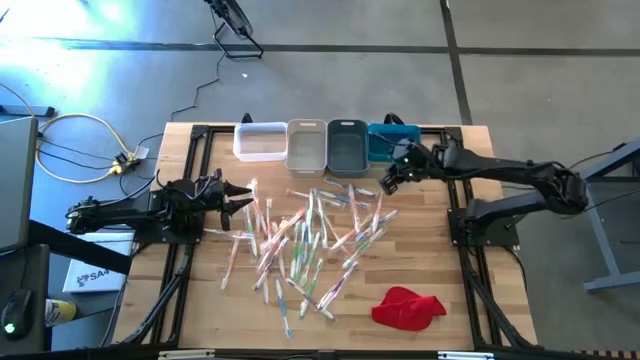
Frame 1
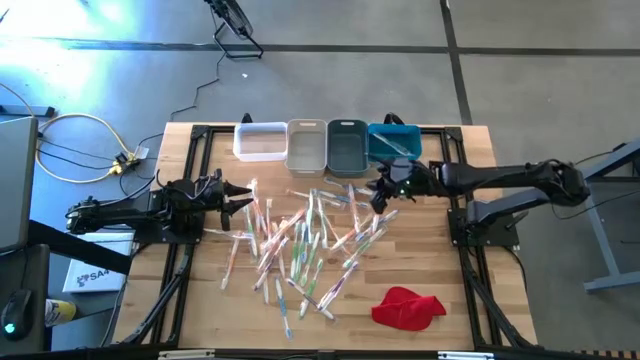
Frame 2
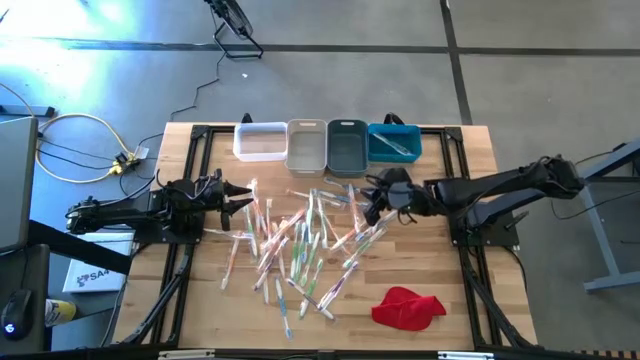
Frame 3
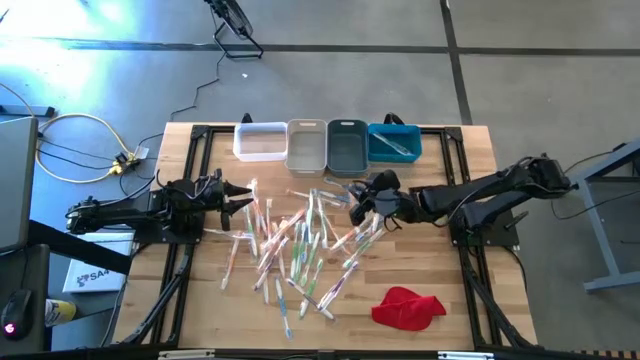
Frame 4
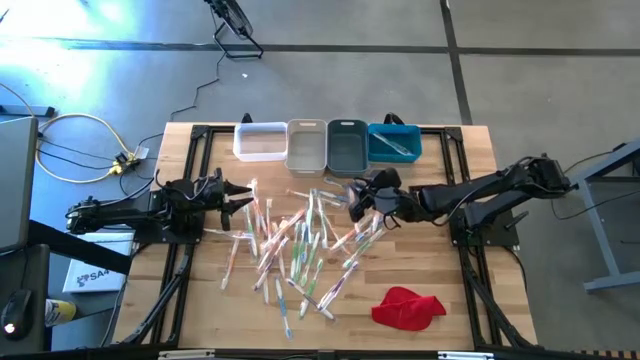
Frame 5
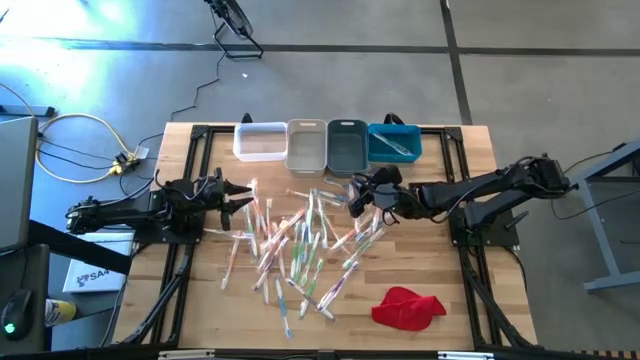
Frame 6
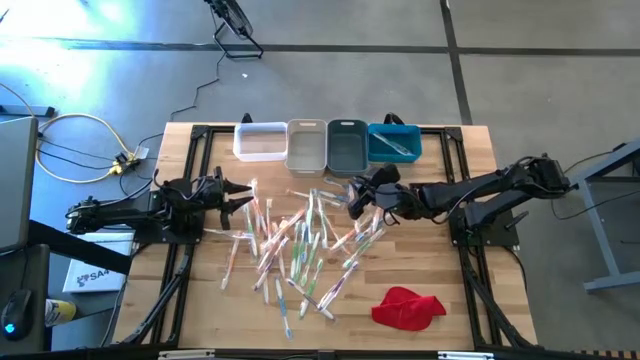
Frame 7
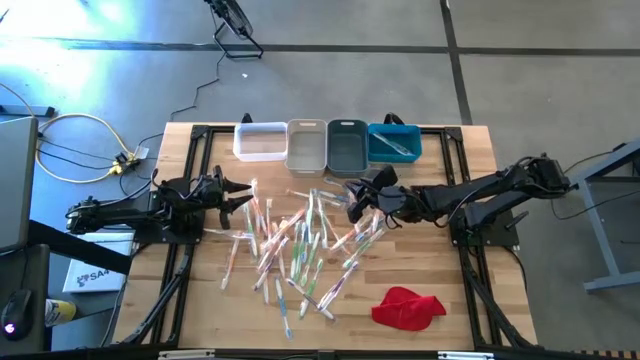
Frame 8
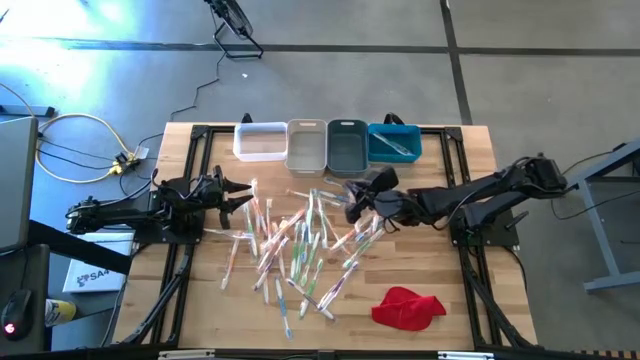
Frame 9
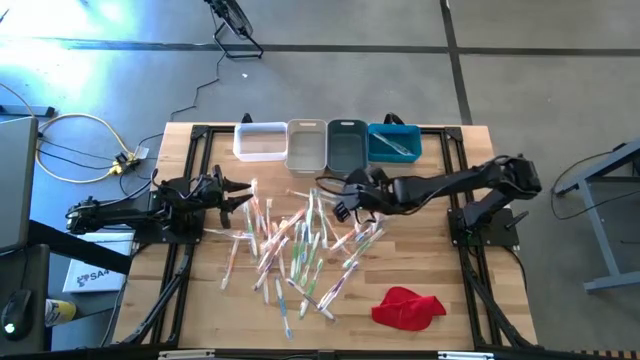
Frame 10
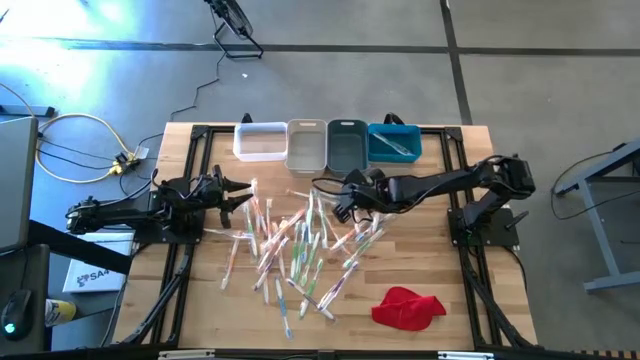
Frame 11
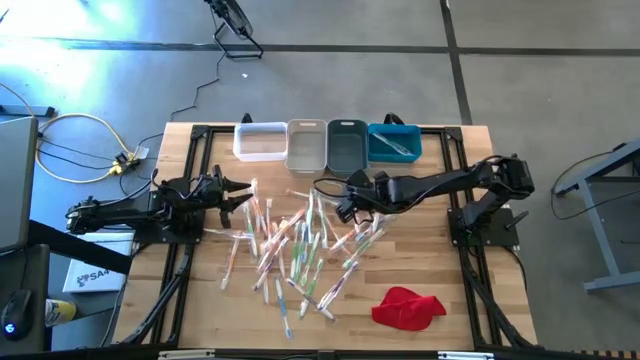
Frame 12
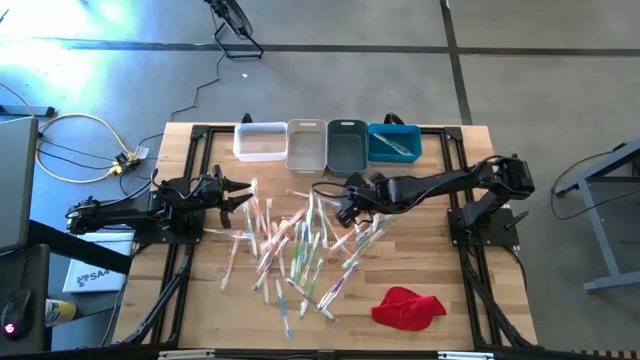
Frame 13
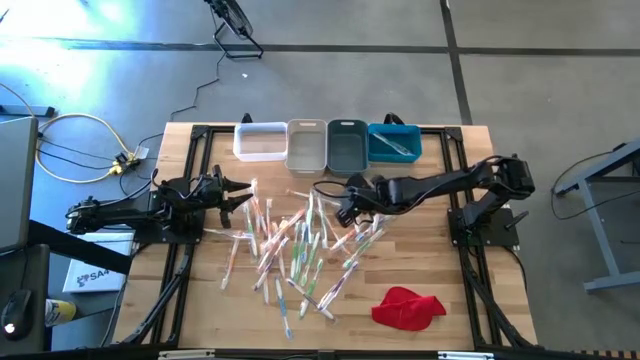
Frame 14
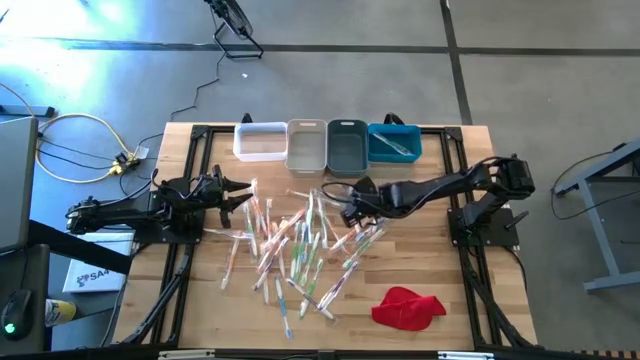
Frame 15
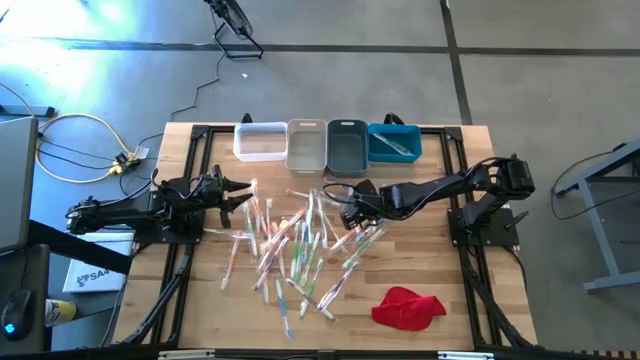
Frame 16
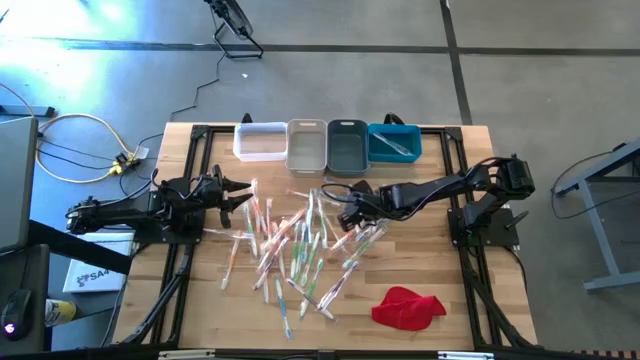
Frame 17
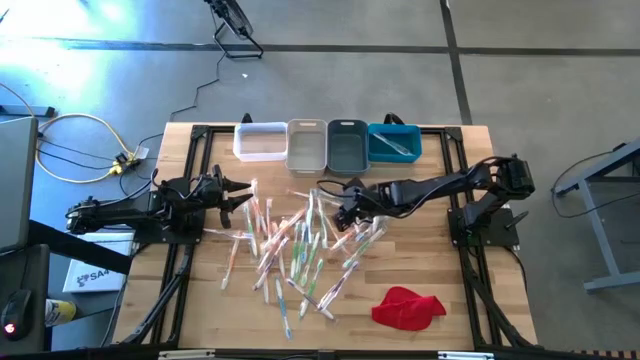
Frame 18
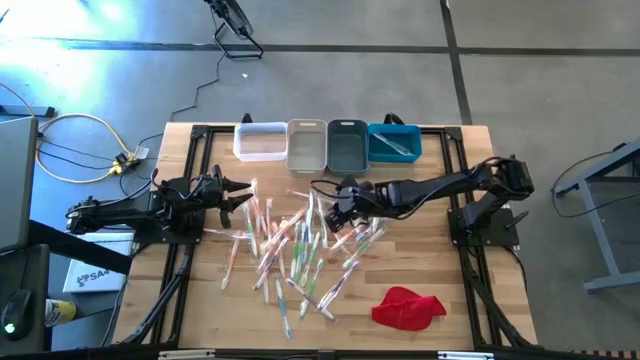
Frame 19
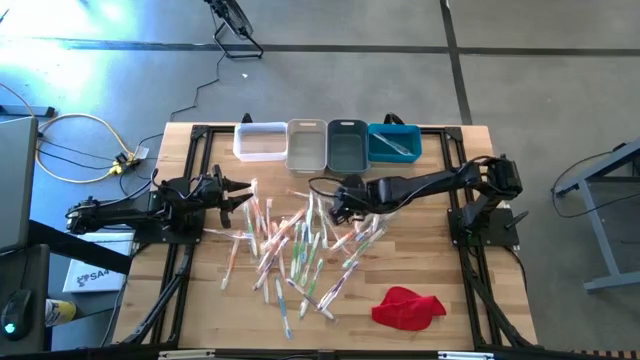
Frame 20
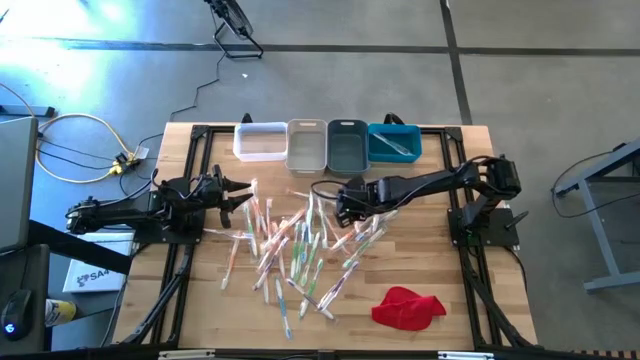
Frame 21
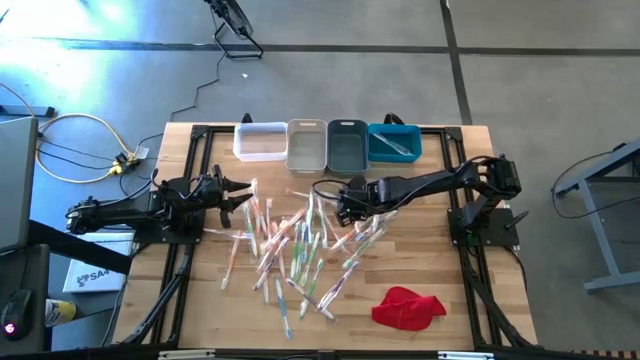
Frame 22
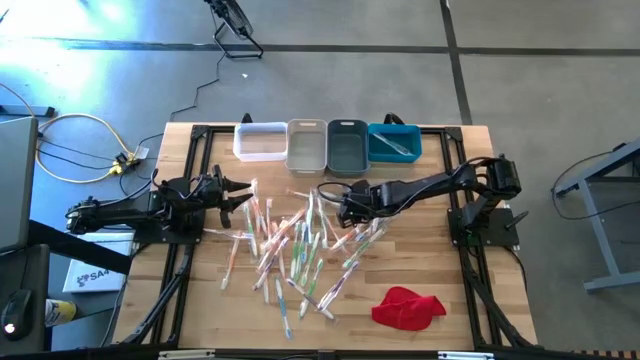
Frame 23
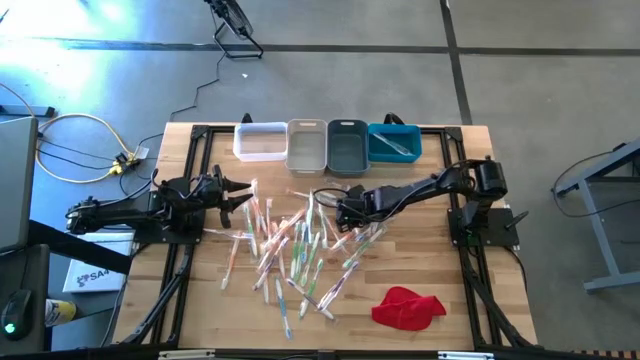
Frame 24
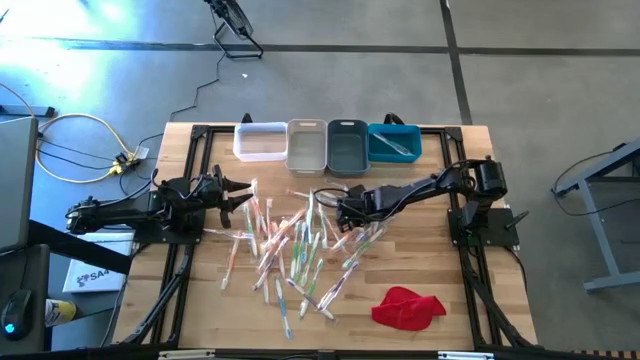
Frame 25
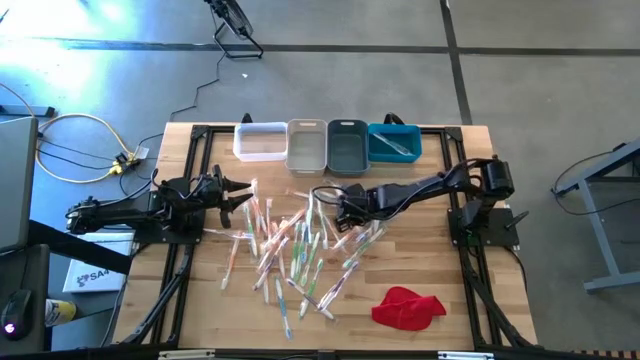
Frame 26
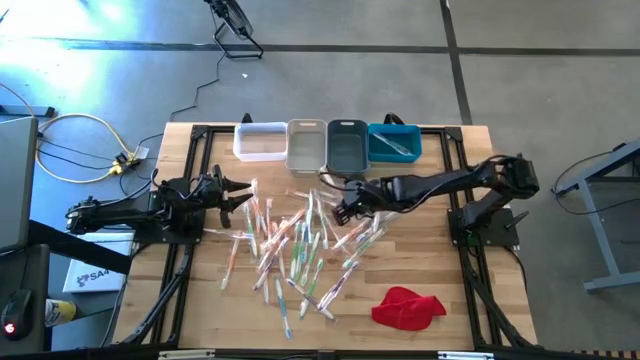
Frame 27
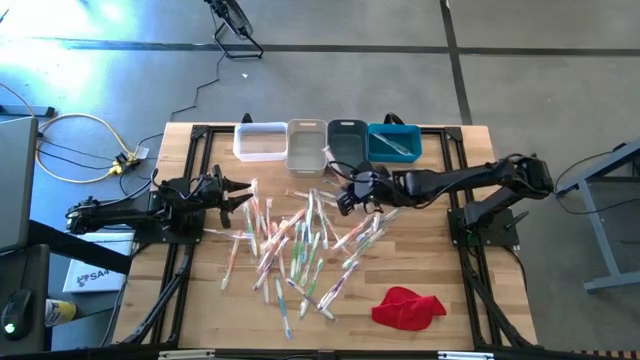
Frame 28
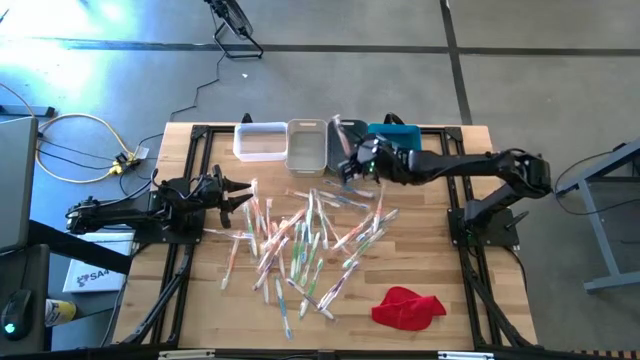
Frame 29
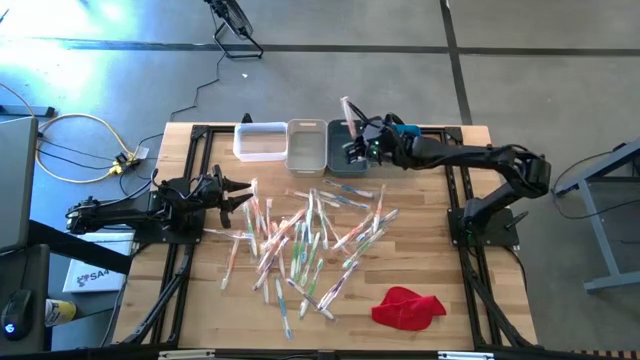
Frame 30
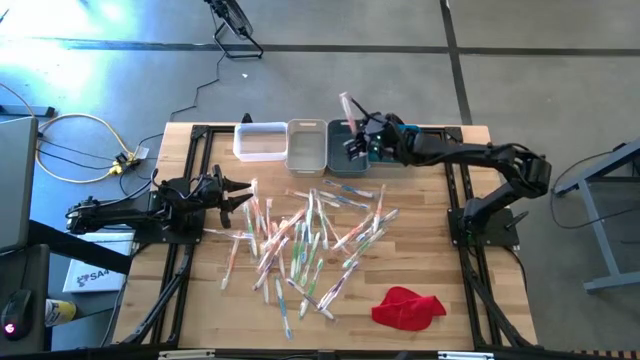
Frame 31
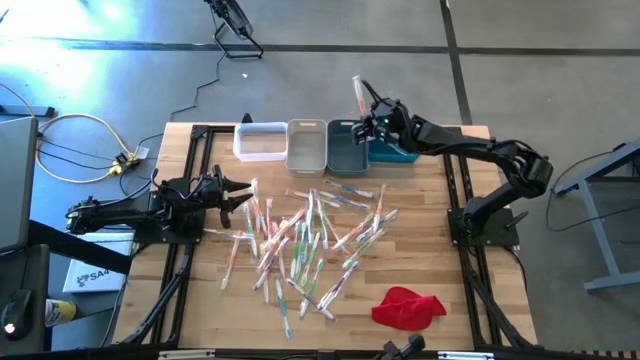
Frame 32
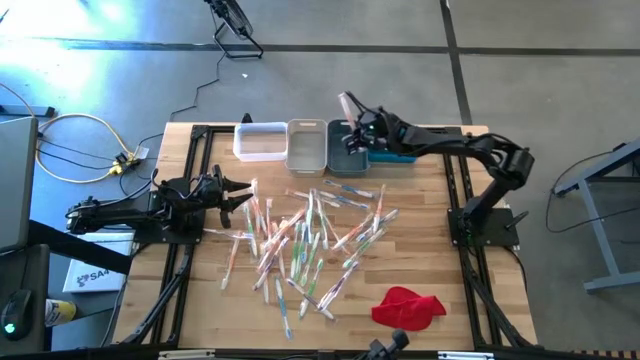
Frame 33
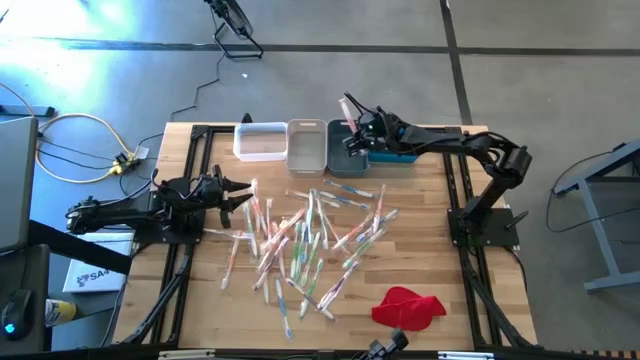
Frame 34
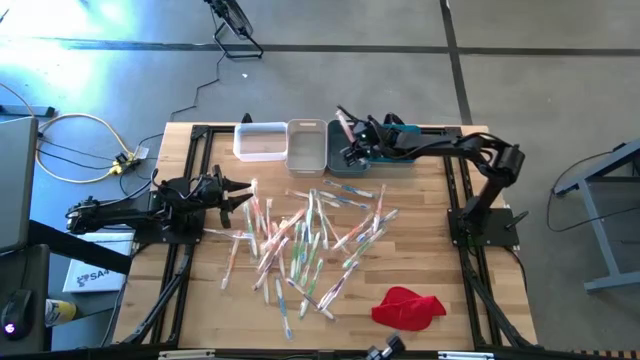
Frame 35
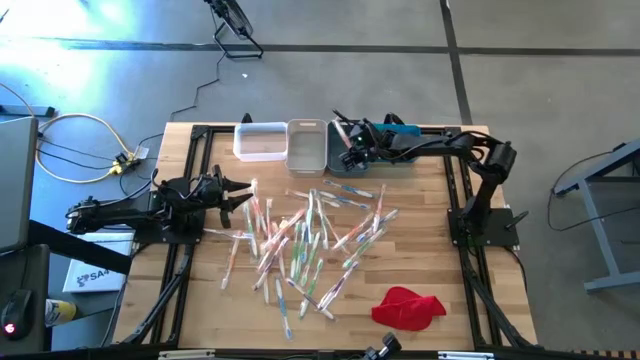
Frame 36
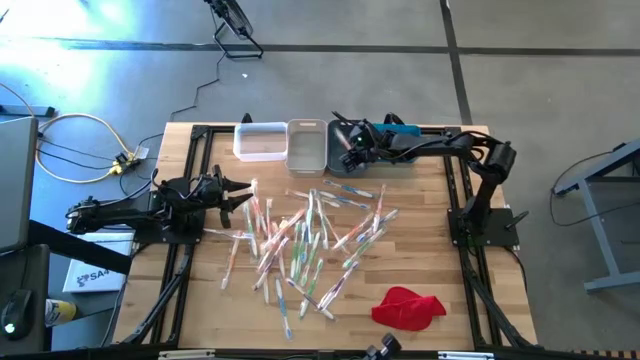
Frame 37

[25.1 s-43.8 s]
Task: Pick & Place Toothbrushes
Put the orange toothbrush into the dark green bin

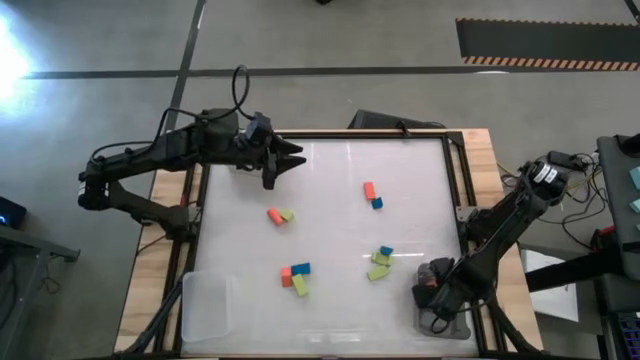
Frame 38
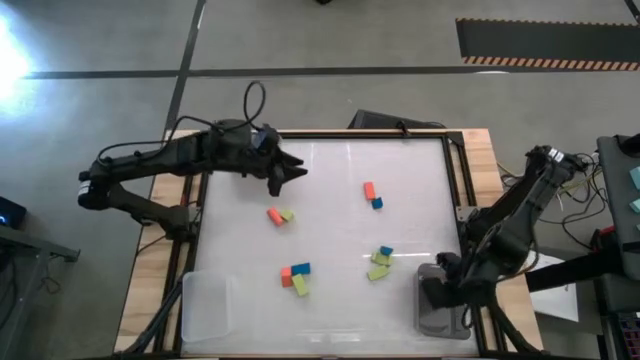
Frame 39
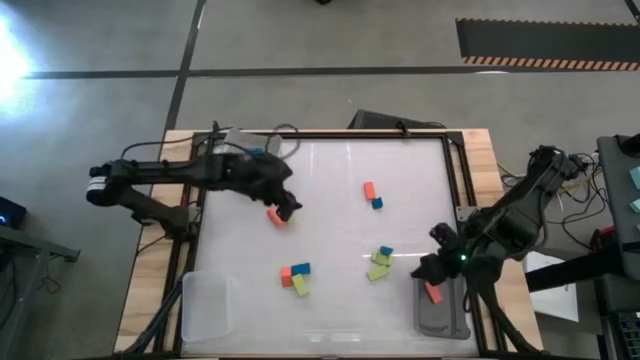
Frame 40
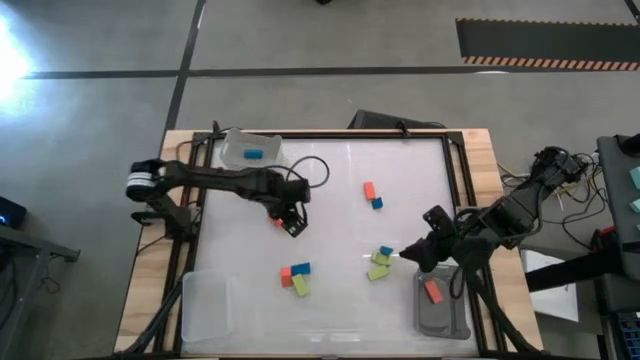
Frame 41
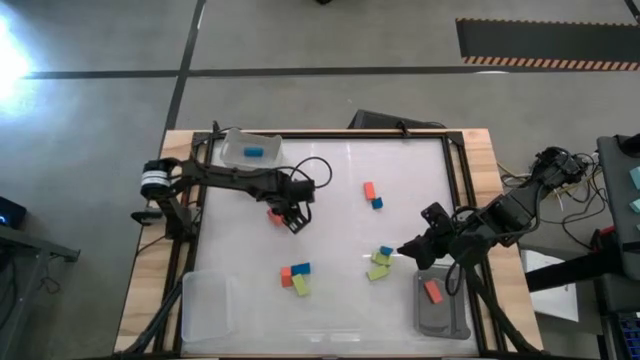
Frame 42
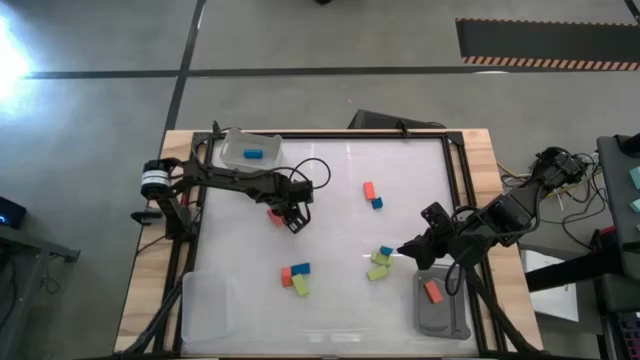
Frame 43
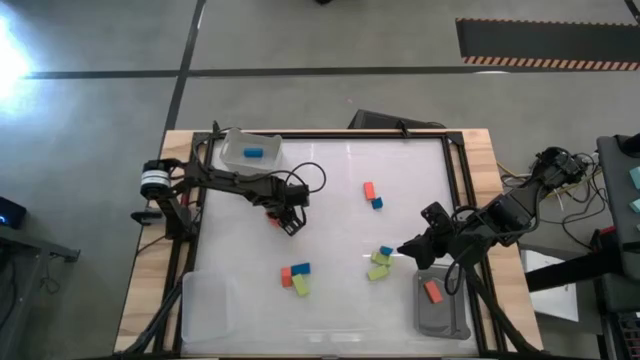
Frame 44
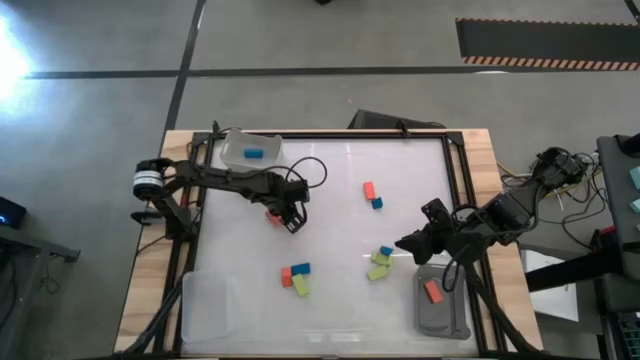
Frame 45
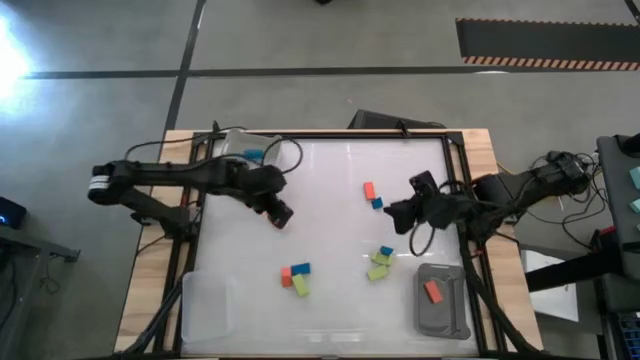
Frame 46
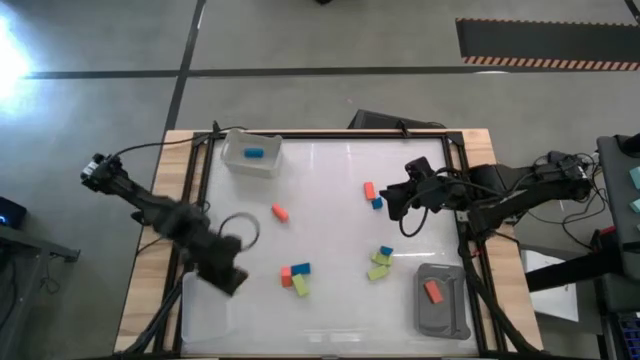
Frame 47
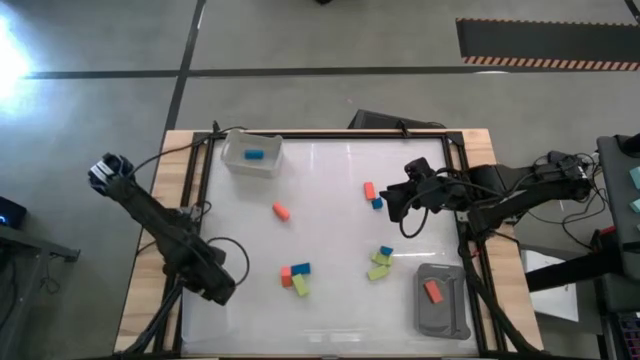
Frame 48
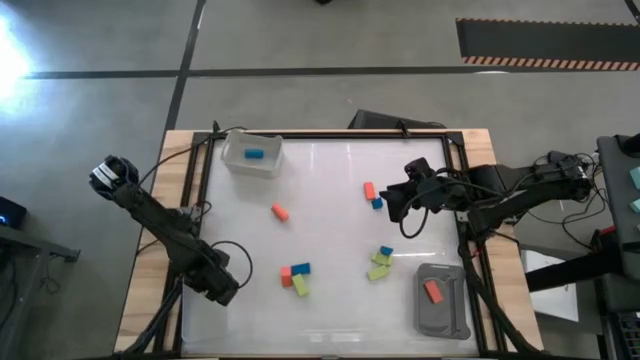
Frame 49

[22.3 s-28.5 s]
Task: Sort & place blocks by color
Put the green block into the transparent bin
